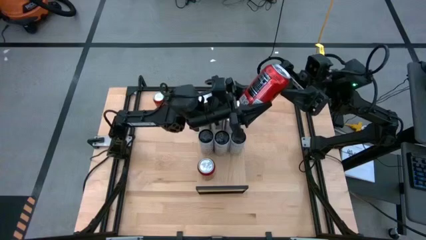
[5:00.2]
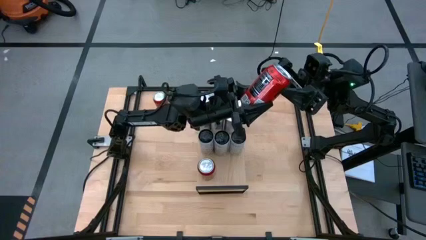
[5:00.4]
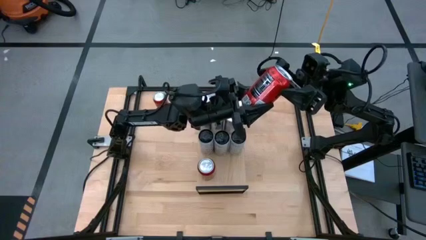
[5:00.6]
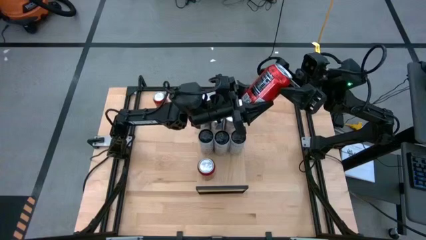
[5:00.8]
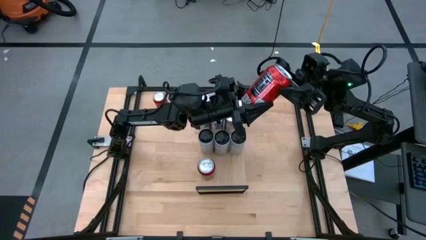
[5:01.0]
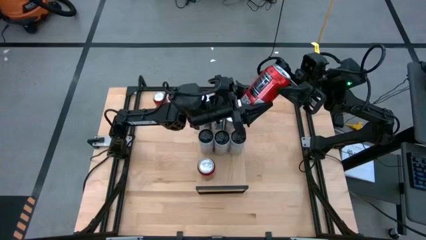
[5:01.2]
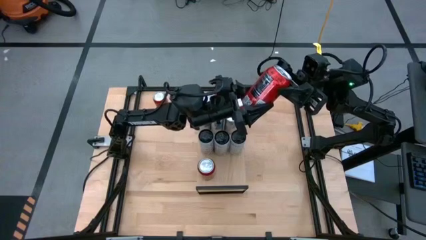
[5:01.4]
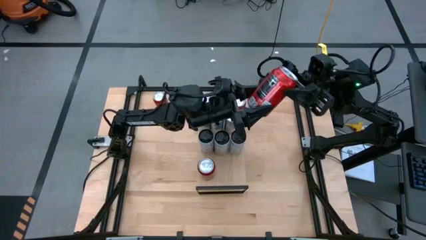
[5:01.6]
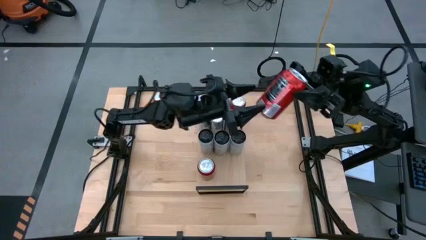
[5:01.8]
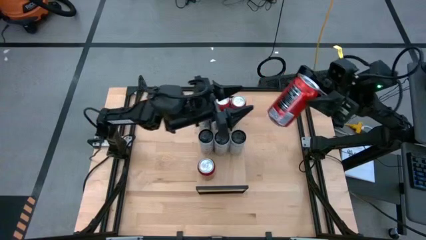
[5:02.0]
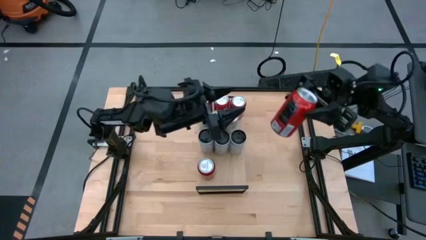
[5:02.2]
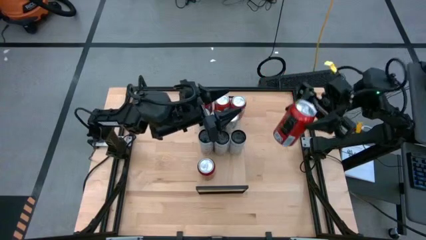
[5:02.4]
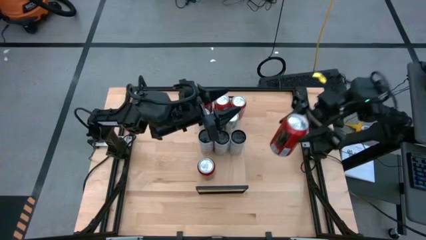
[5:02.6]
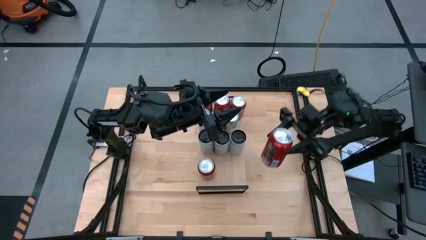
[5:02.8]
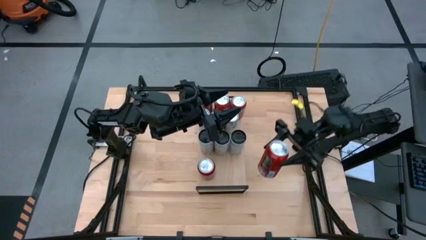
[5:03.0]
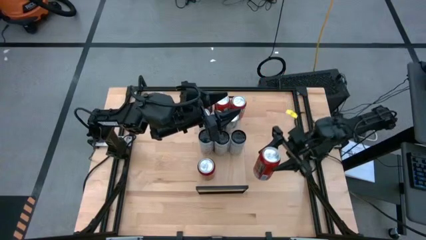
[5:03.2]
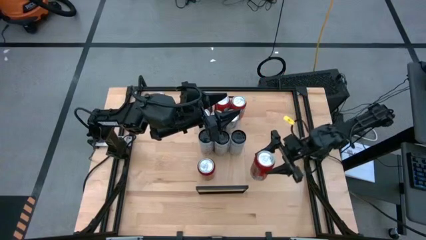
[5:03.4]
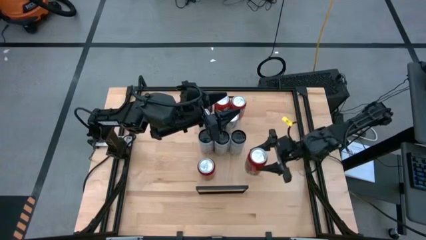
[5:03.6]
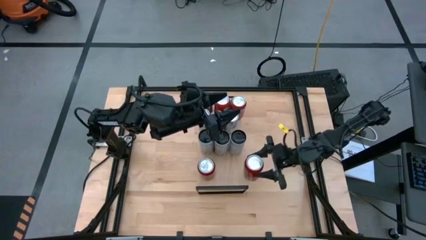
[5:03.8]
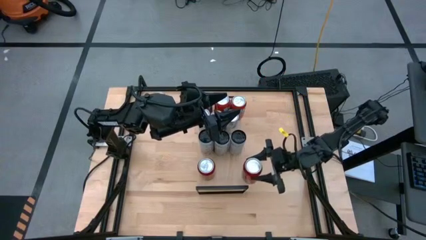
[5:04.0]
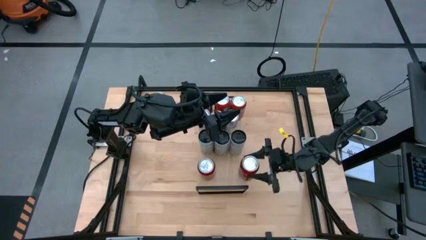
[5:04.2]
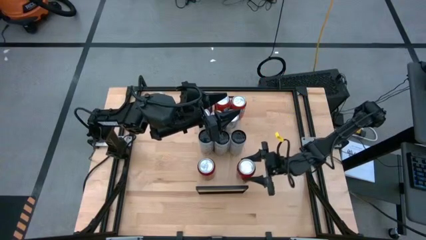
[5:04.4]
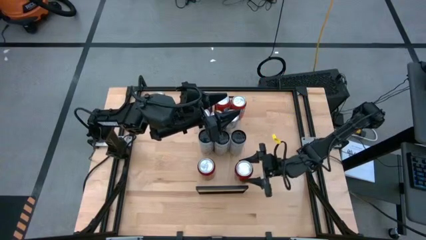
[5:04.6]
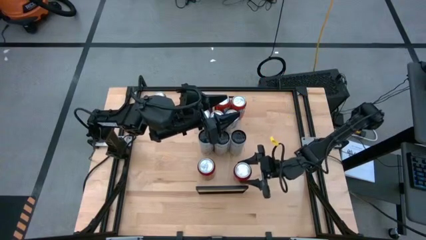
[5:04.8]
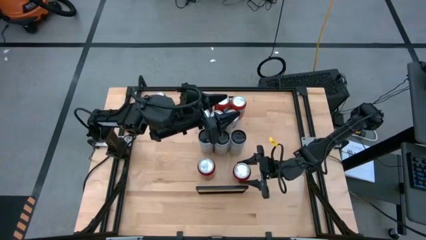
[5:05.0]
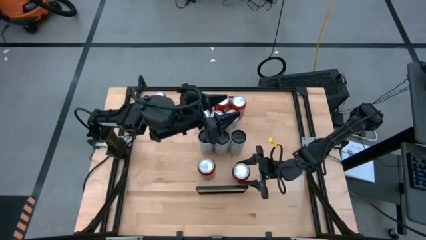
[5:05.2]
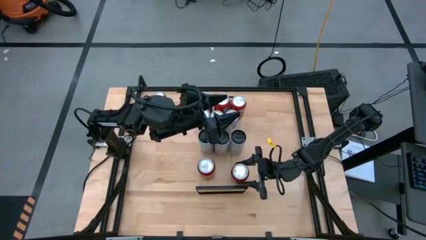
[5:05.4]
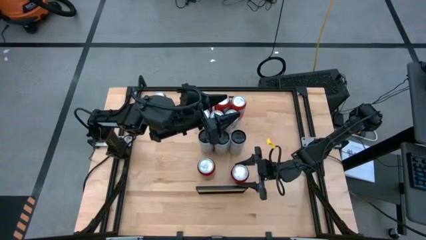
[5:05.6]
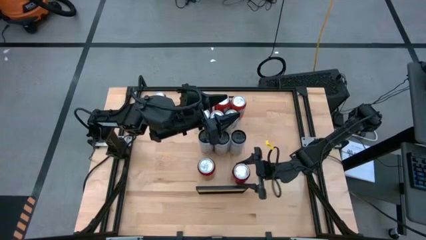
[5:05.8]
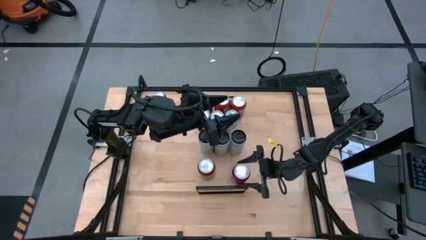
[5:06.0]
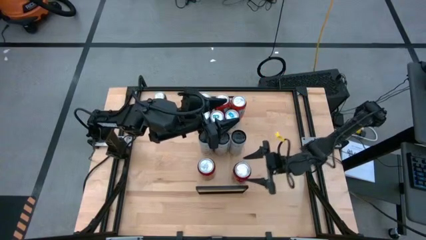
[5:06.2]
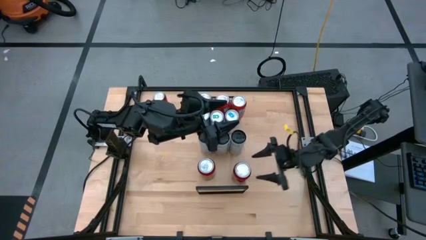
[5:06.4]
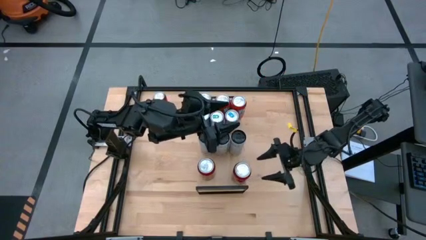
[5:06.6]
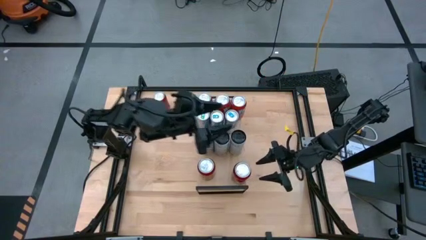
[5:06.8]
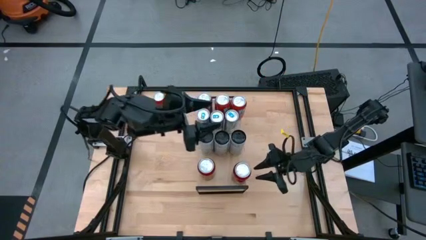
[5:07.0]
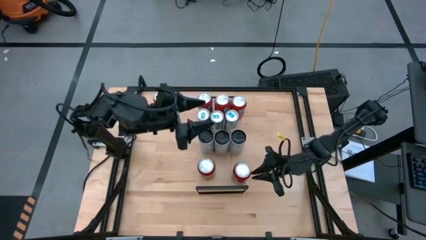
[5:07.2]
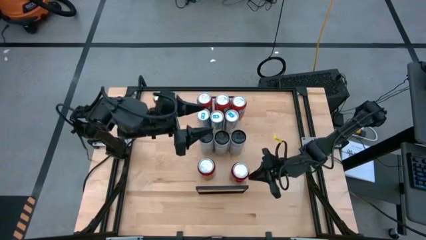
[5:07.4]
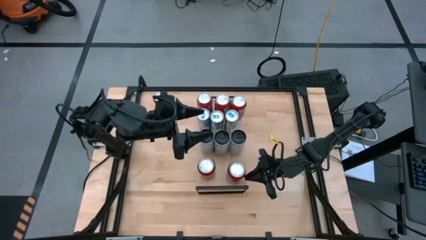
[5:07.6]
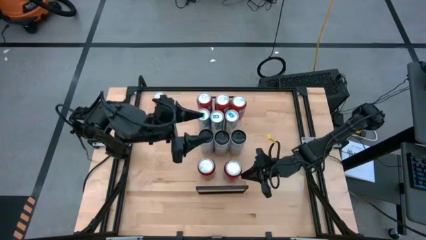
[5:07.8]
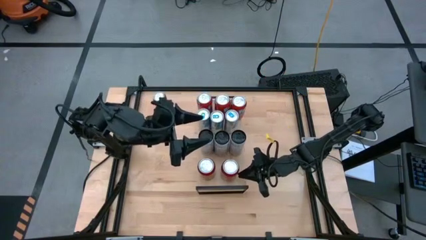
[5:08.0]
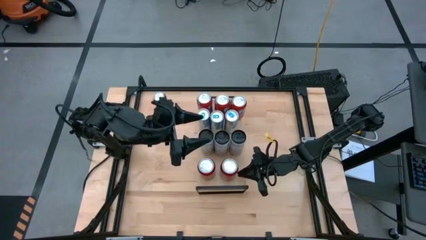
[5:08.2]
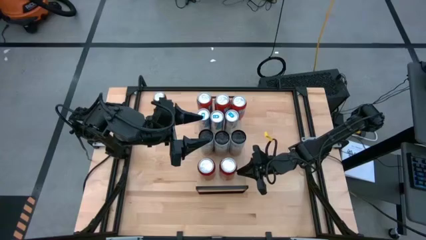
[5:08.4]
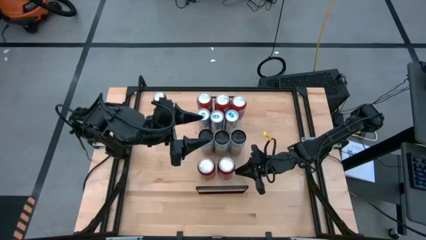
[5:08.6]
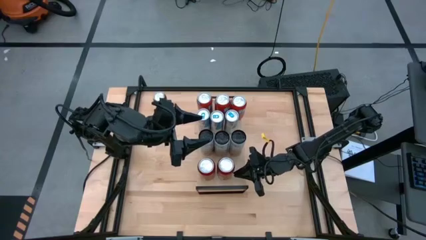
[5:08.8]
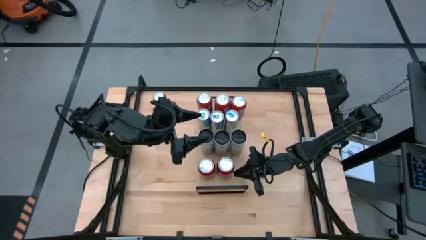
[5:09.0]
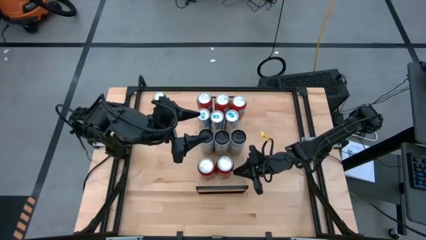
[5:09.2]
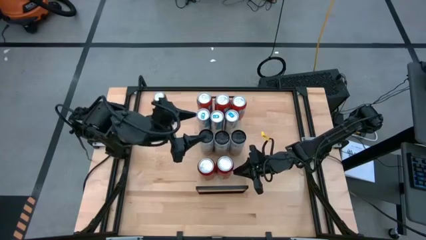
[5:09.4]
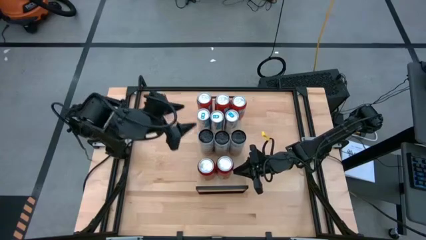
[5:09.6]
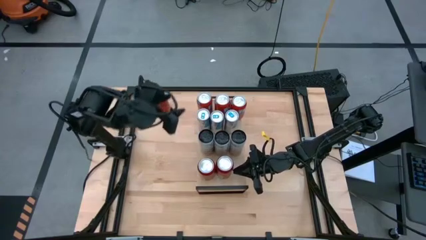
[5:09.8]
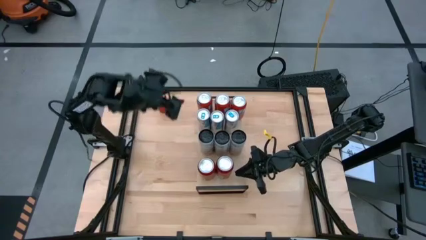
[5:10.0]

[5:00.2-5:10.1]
Task: Place canned beverage on shelf
Put the right red soda can on the shelf aligned with the other red soda can
